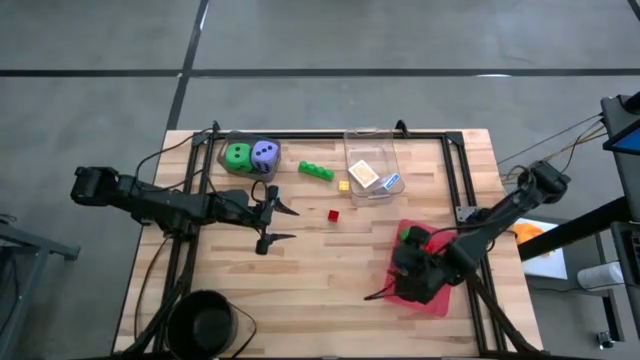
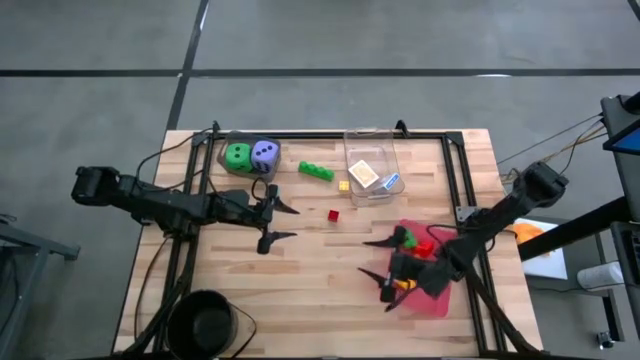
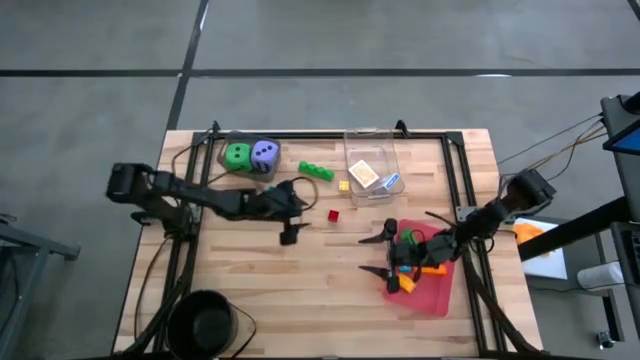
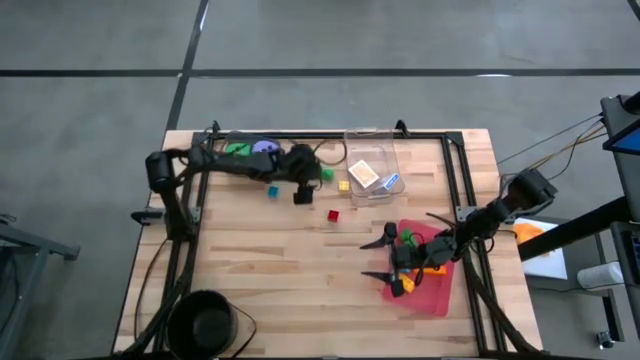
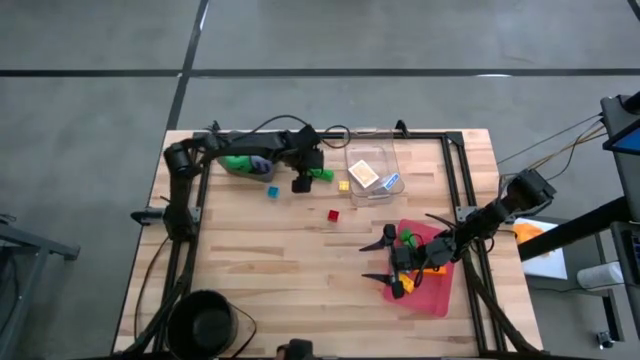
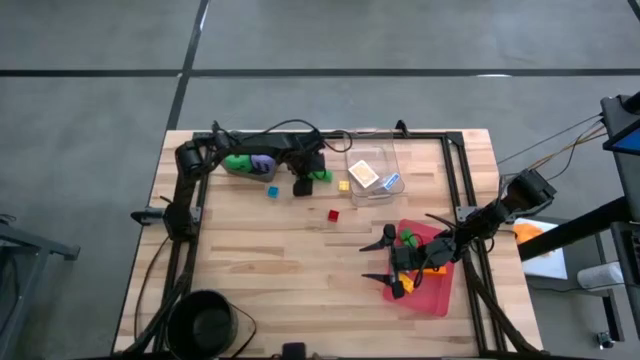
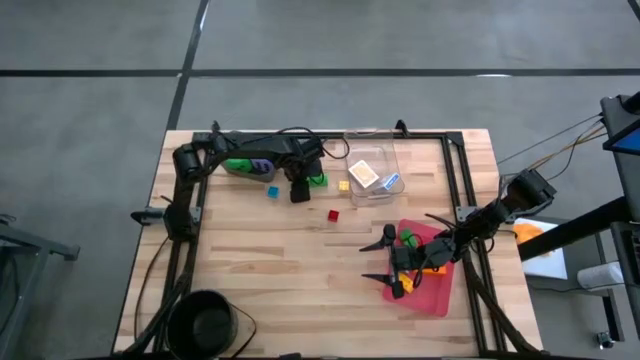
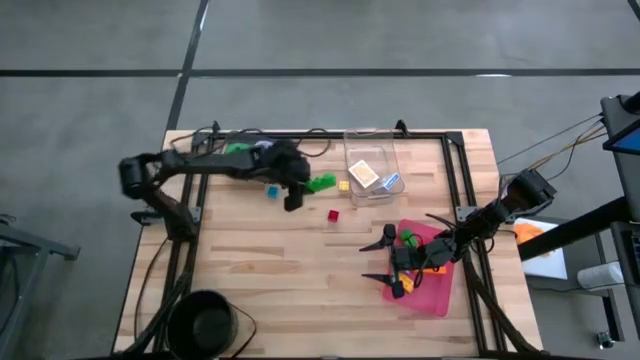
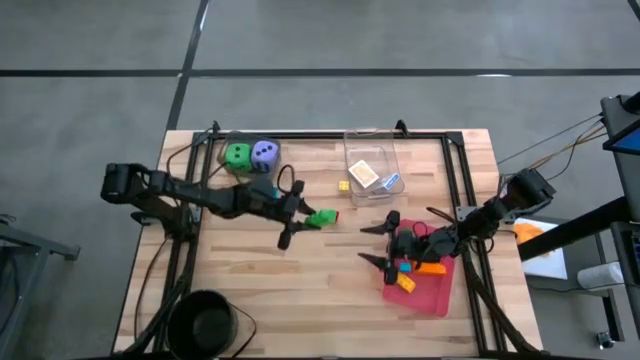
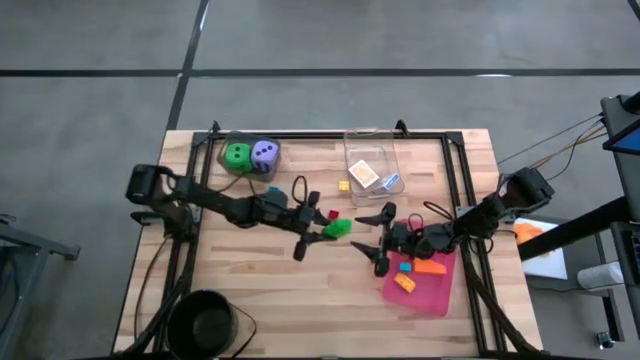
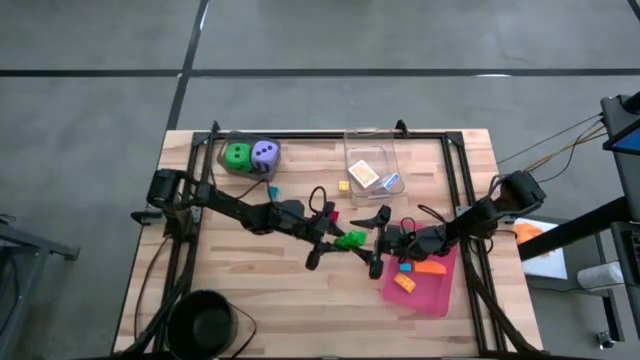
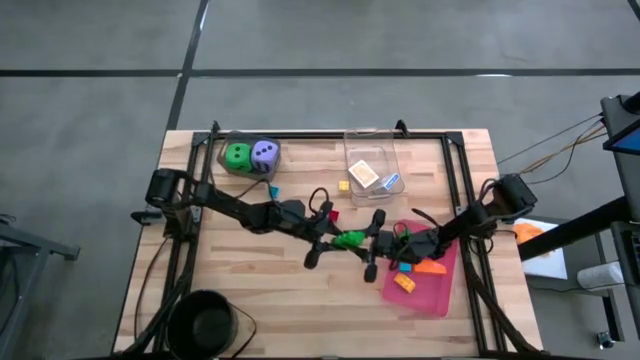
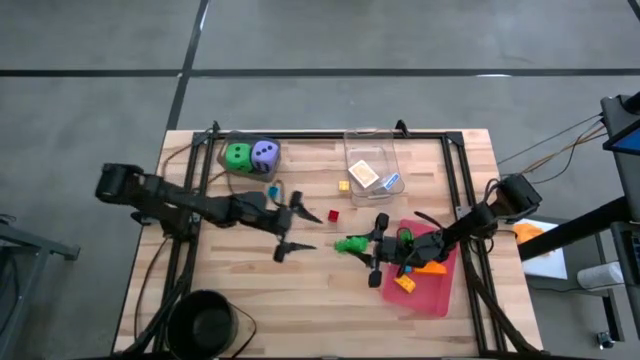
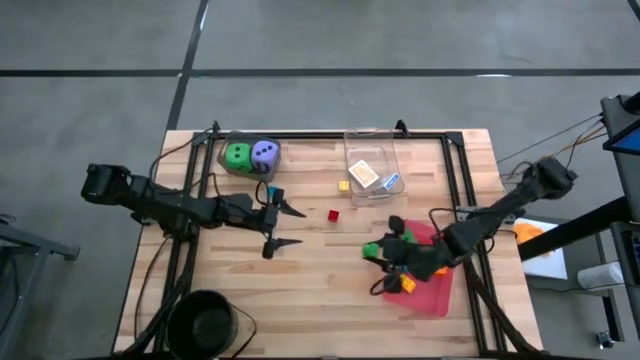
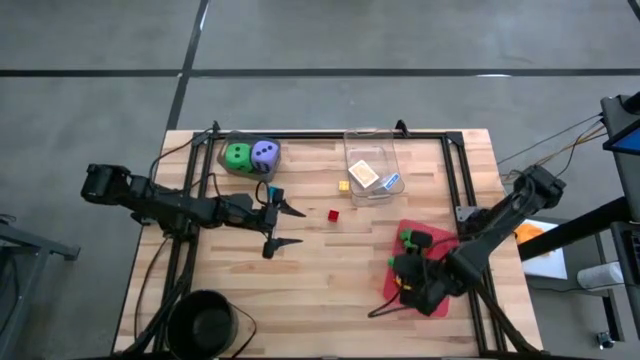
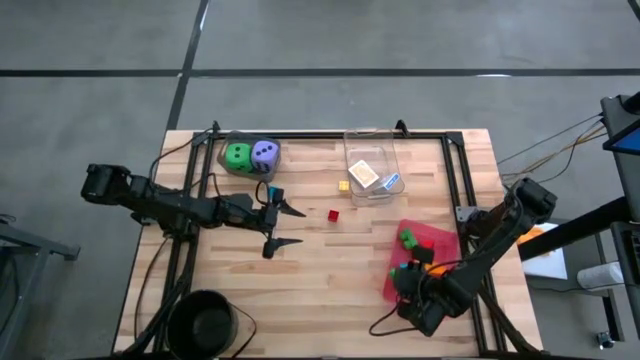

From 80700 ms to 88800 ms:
Task: Pick & Place Toys
Put the green game piece into the pink bin

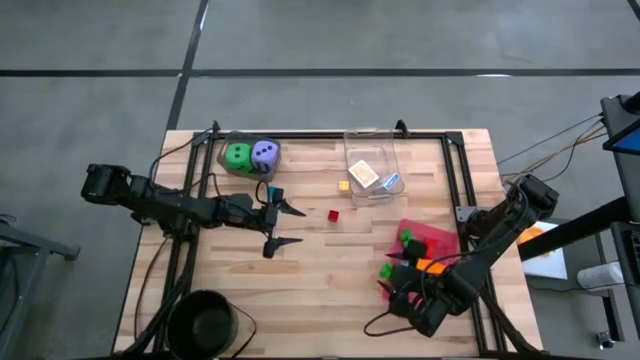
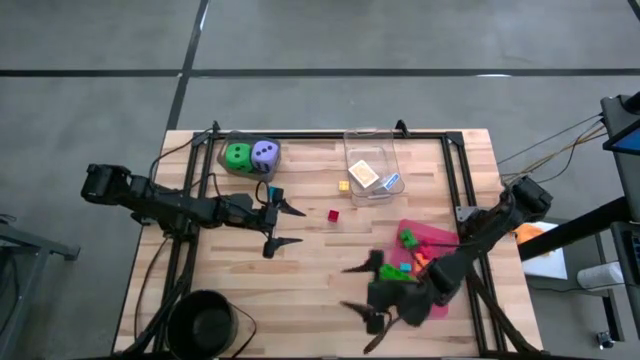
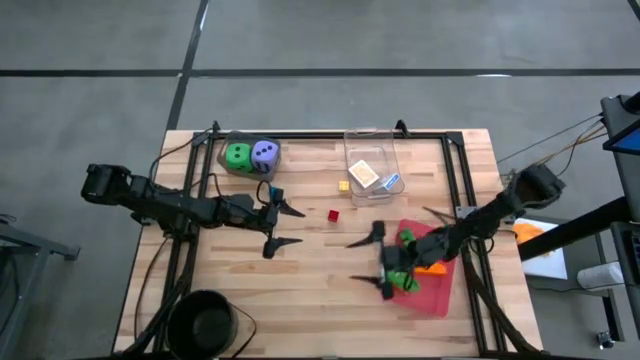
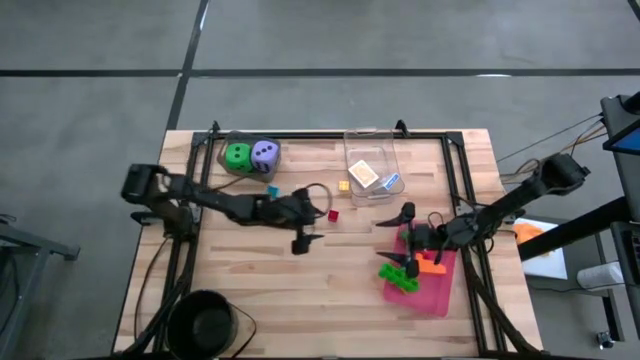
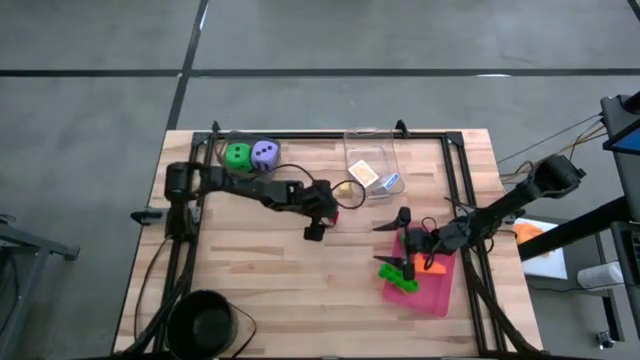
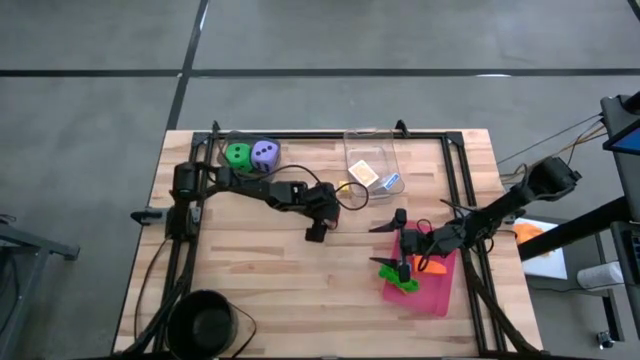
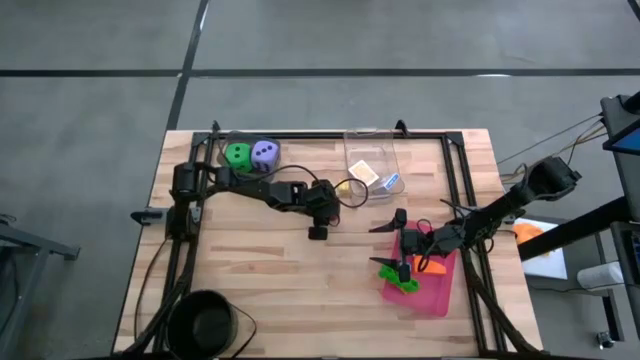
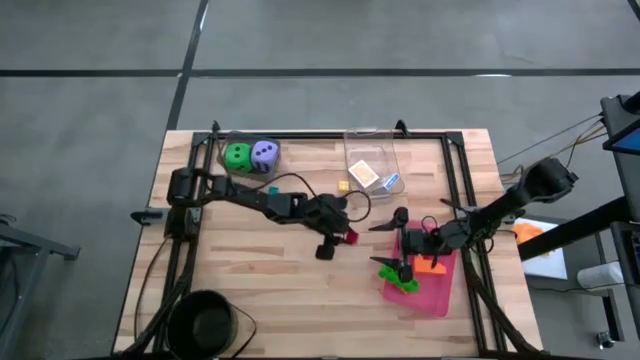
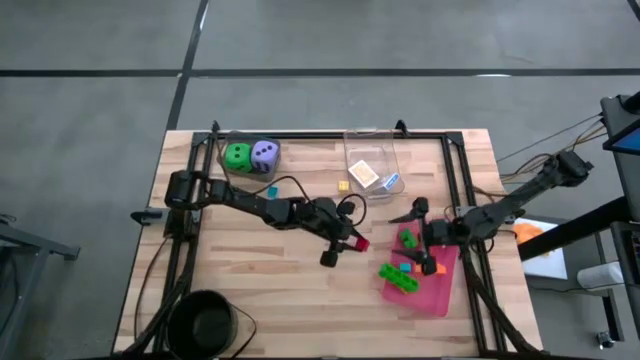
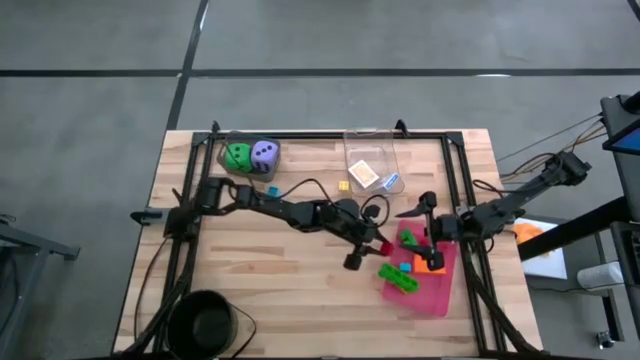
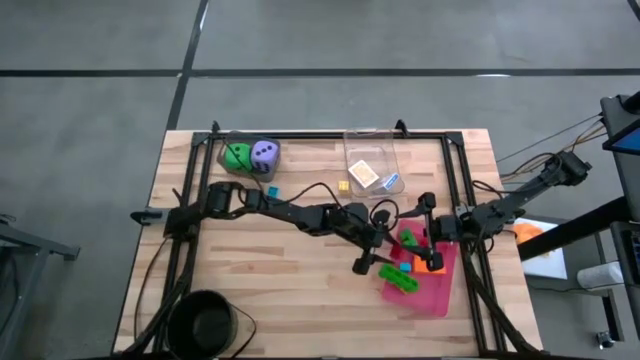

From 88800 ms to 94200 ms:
Put the red game piece into the pink bin

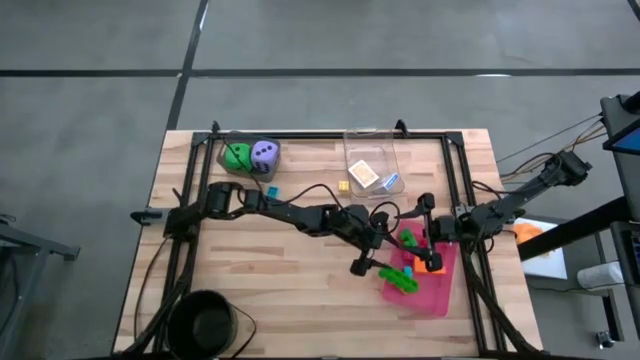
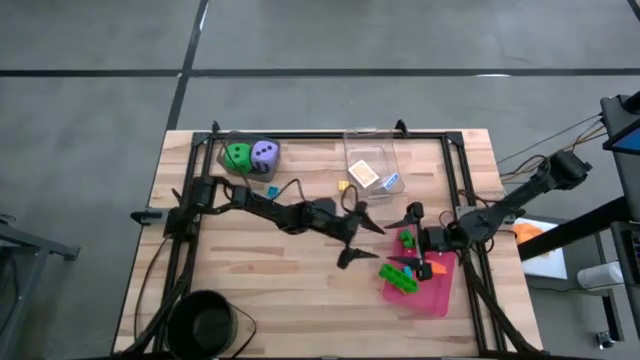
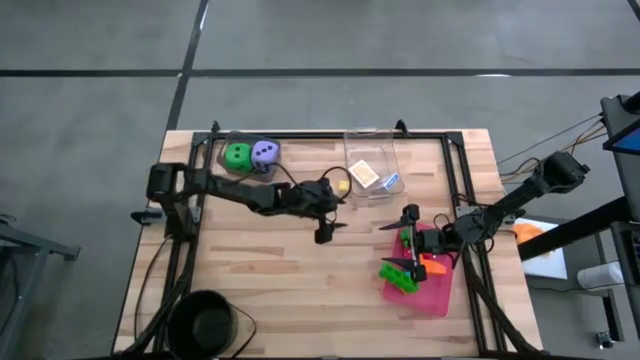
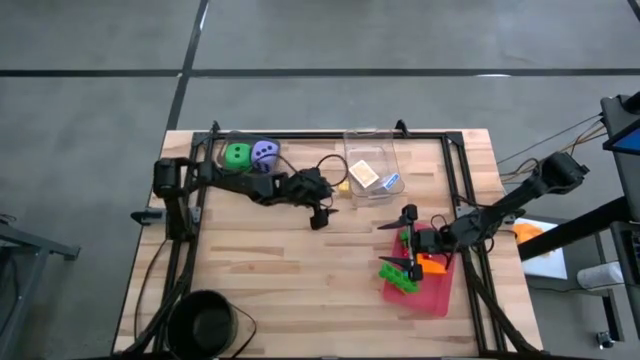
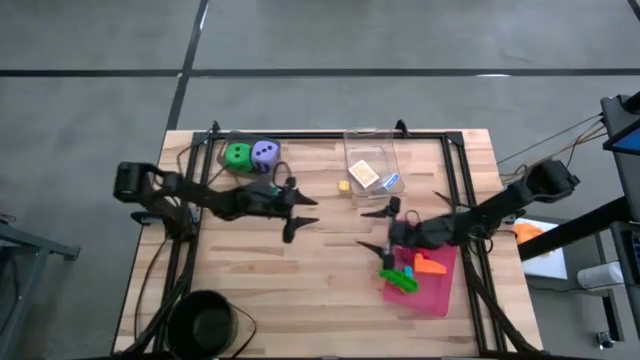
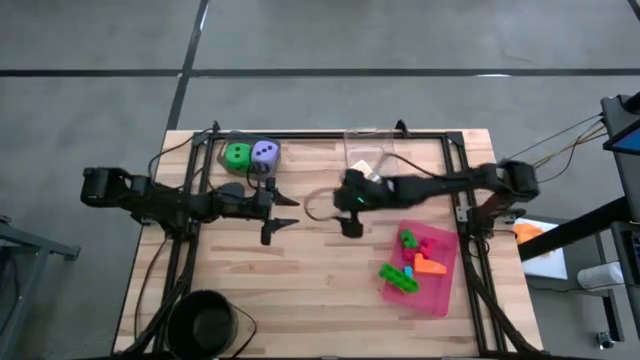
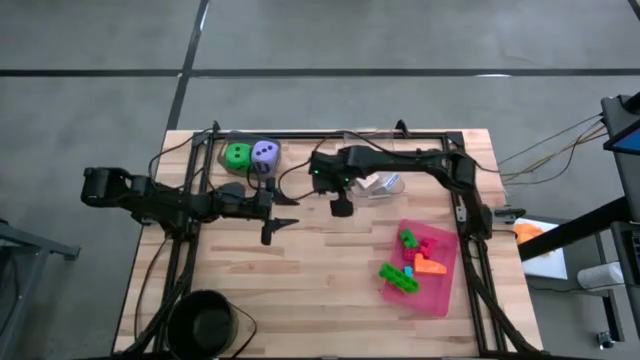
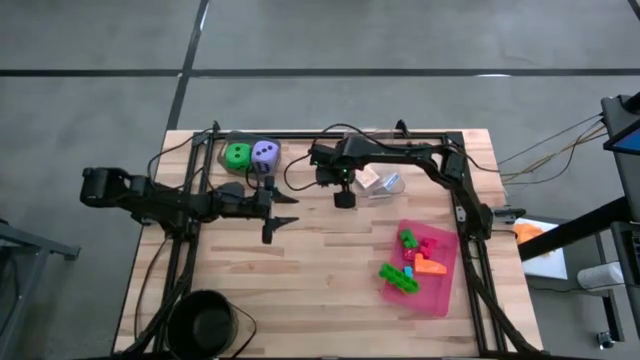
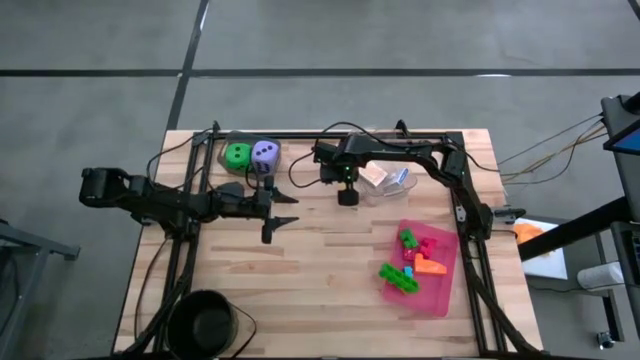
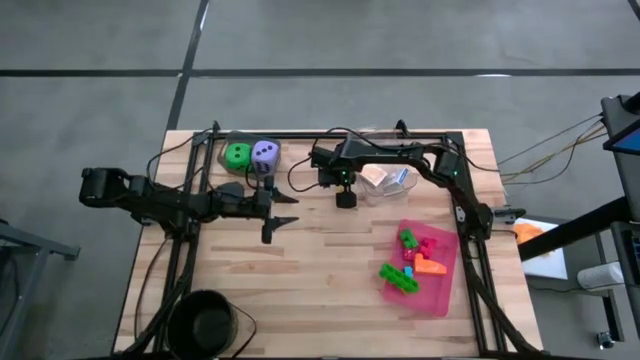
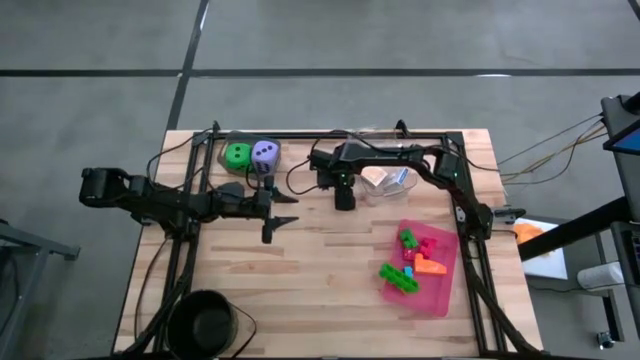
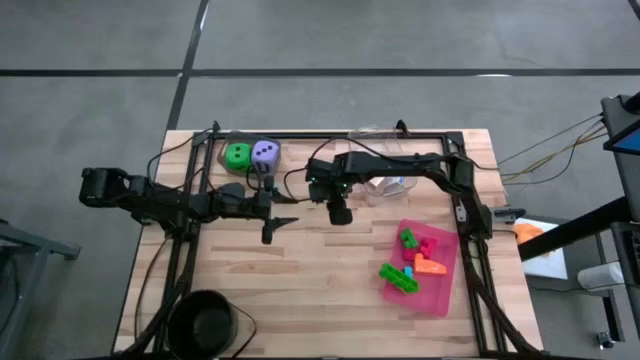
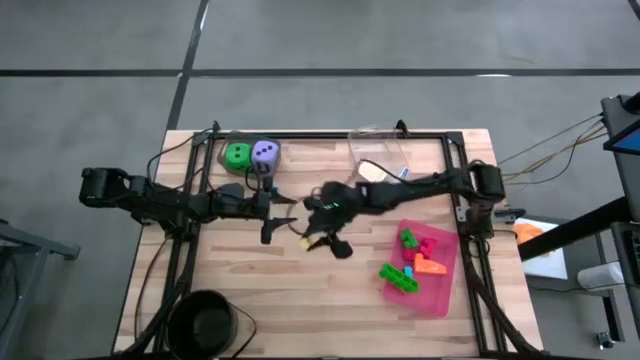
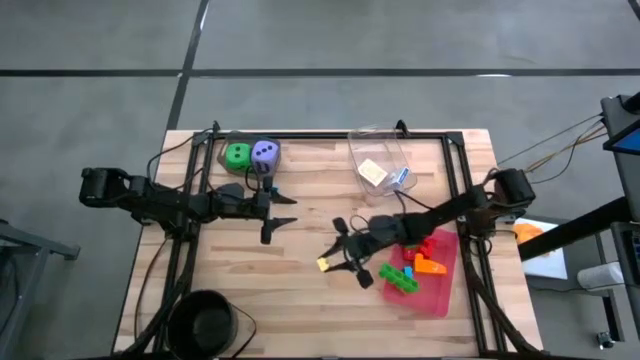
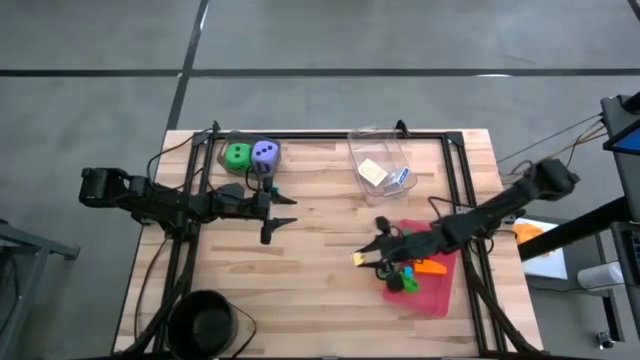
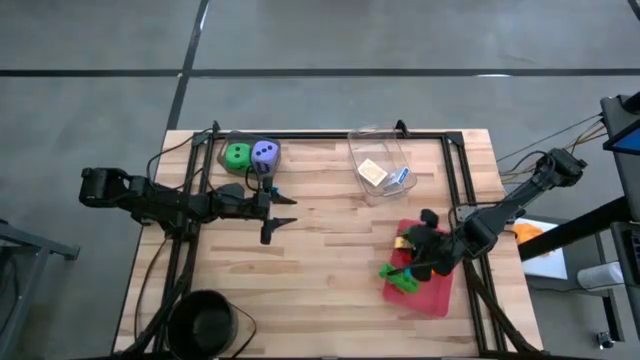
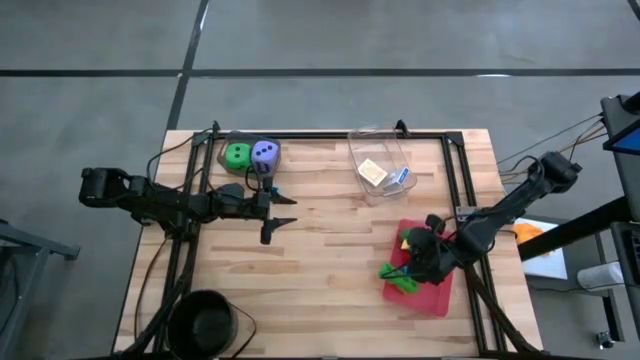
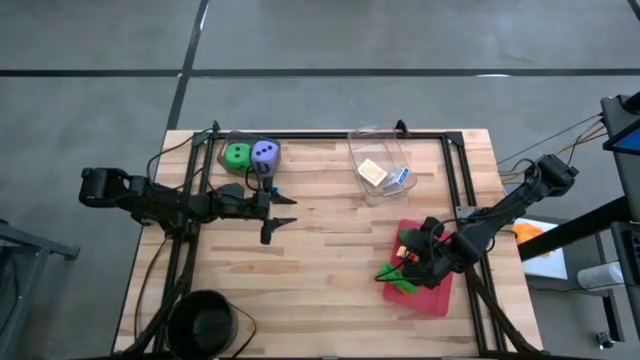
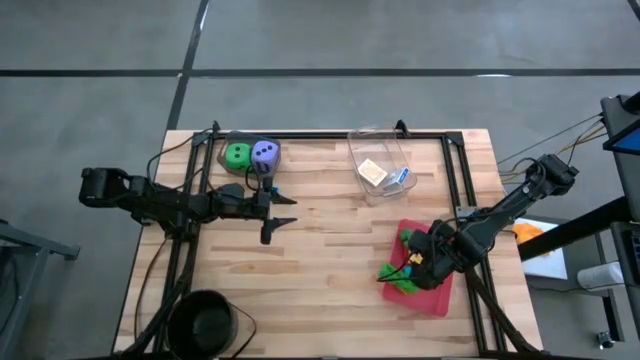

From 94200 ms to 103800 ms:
Put the light yellow game piece into the pink bin
